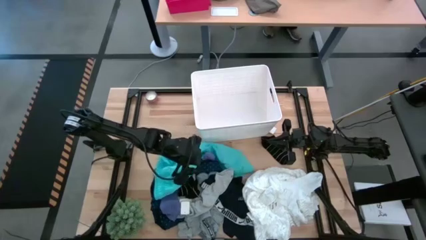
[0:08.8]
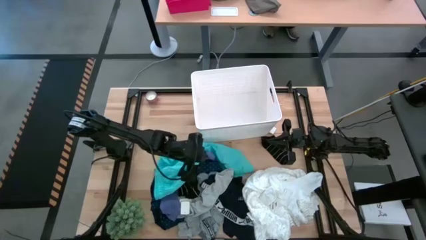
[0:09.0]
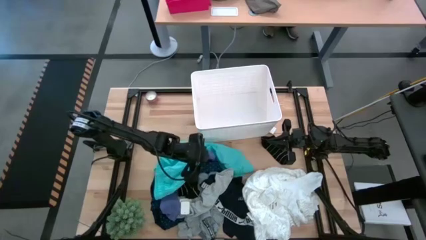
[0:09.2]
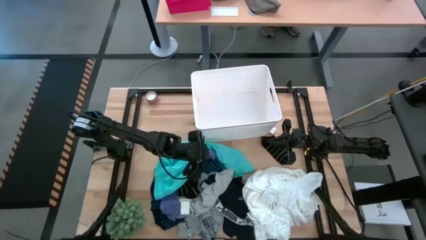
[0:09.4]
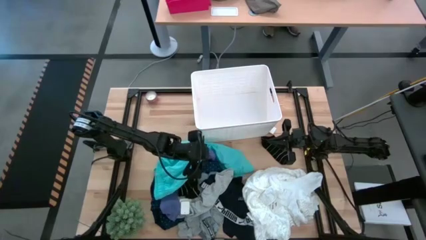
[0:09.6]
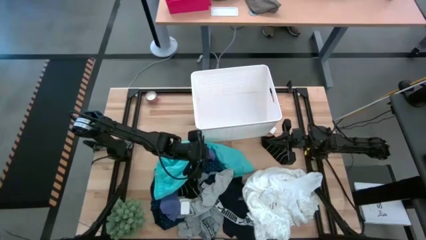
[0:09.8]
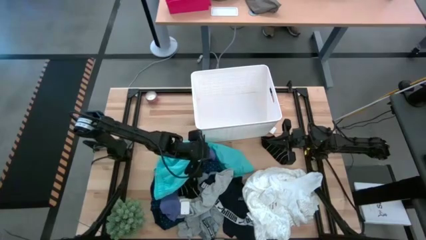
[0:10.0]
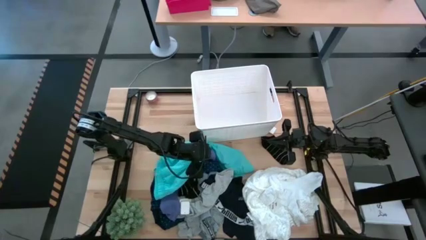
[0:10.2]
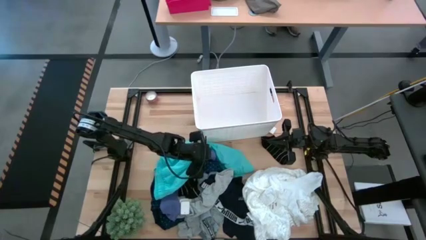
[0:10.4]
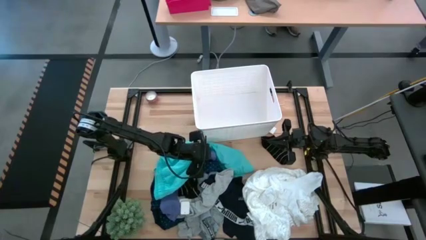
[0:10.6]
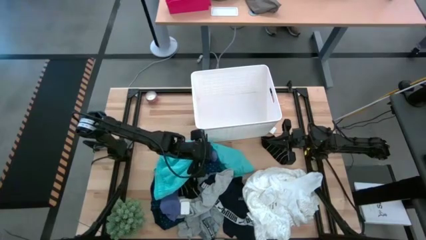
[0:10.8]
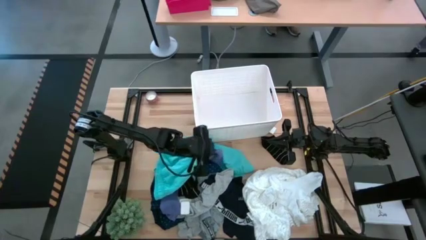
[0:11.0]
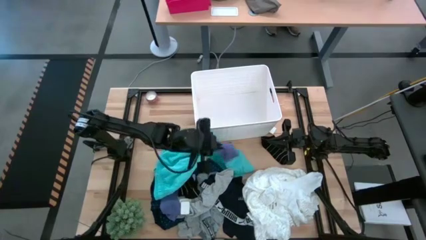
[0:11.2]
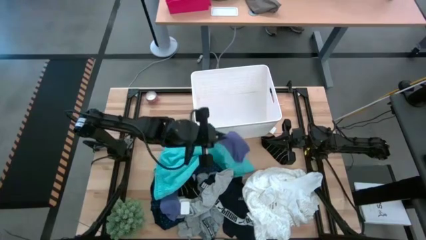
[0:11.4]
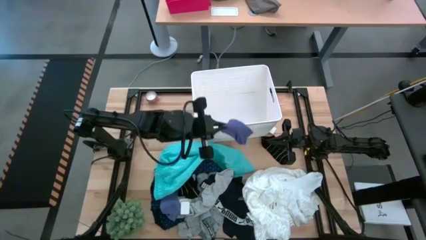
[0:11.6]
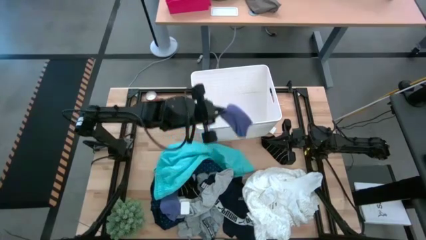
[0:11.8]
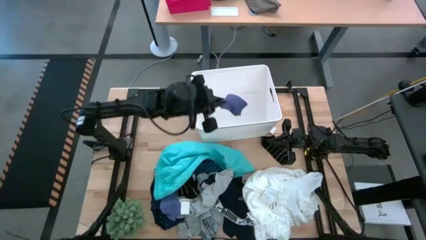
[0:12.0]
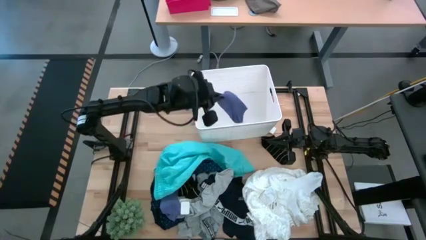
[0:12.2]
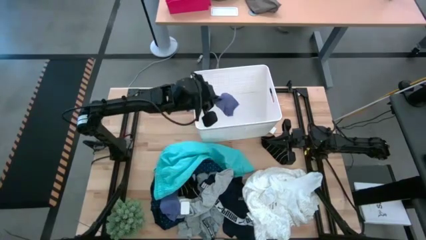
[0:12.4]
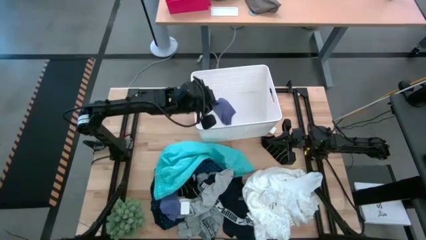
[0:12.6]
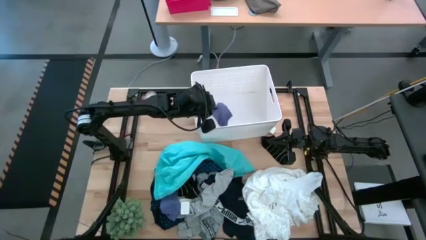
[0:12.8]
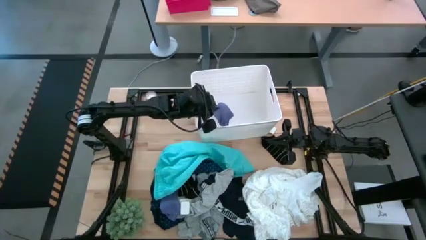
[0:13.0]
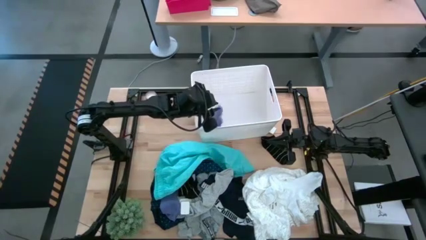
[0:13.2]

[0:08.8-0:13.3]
Task: Sort clothes
Put the purple sock in the bin

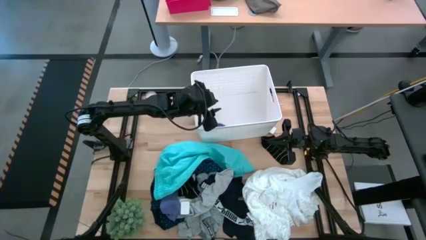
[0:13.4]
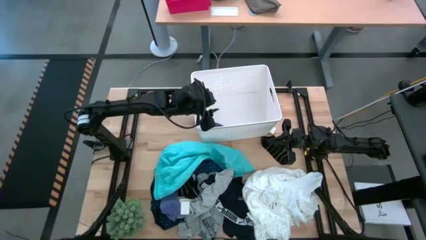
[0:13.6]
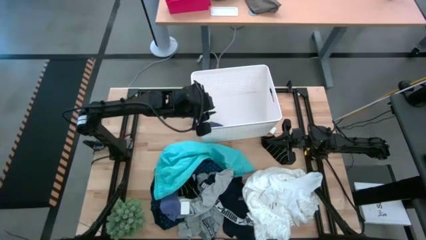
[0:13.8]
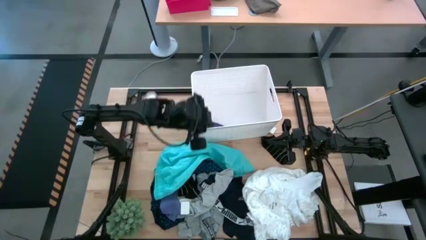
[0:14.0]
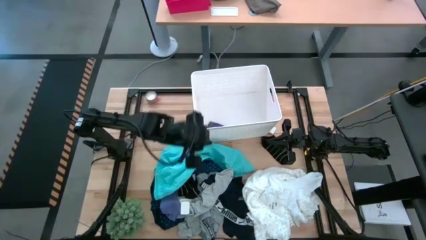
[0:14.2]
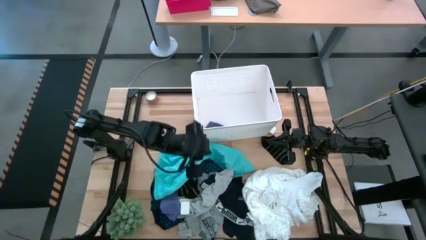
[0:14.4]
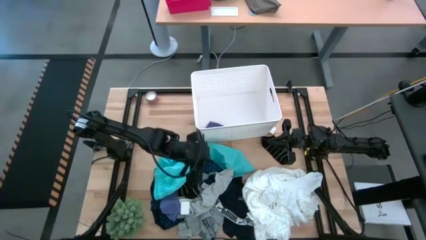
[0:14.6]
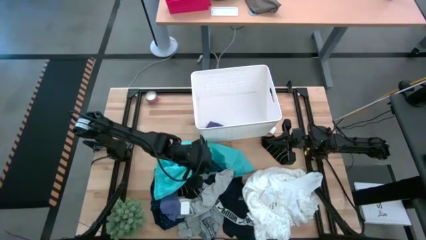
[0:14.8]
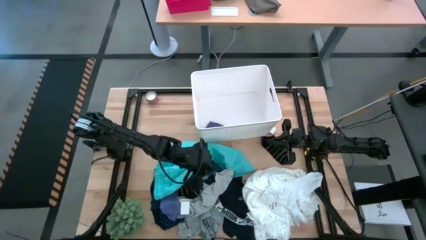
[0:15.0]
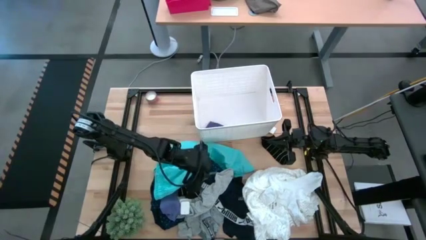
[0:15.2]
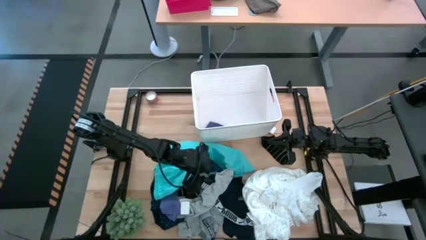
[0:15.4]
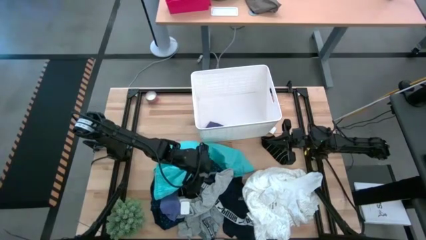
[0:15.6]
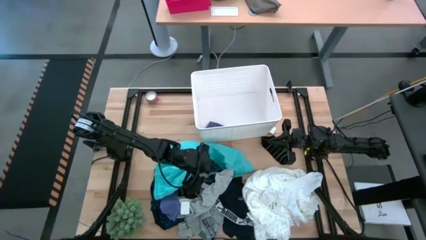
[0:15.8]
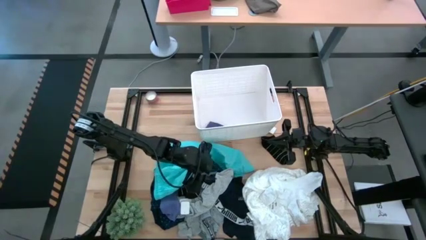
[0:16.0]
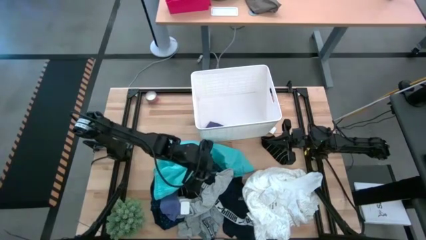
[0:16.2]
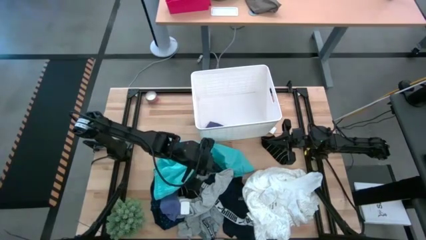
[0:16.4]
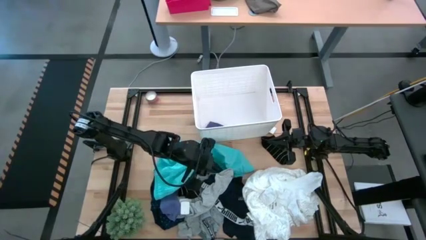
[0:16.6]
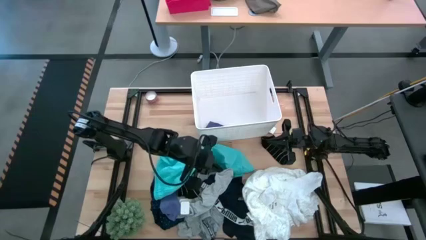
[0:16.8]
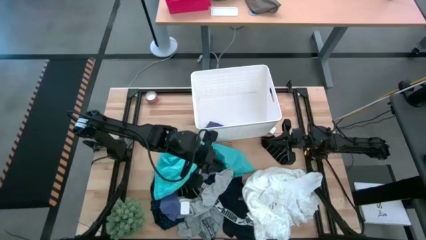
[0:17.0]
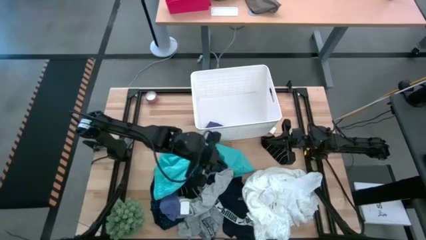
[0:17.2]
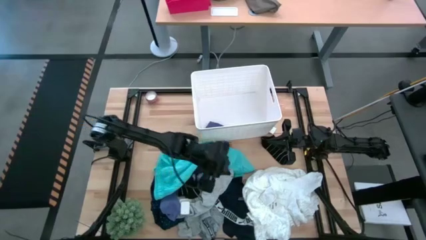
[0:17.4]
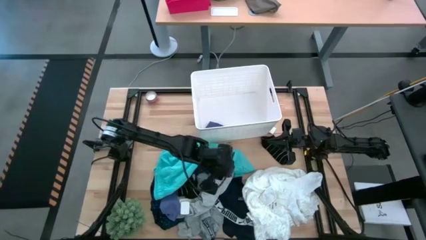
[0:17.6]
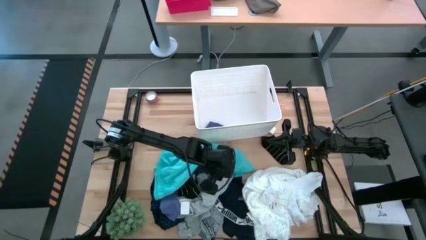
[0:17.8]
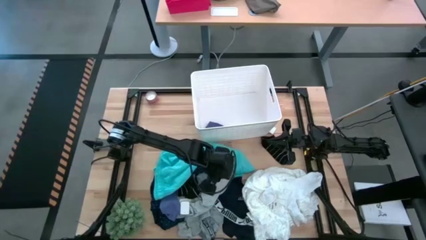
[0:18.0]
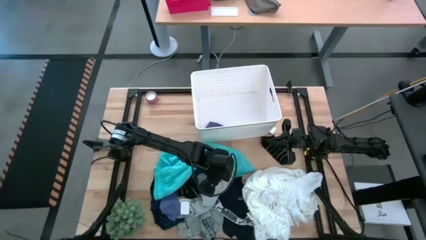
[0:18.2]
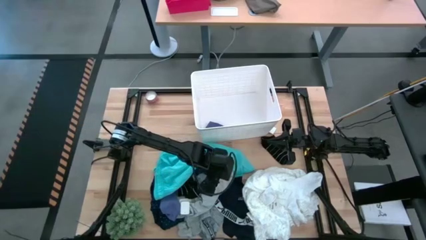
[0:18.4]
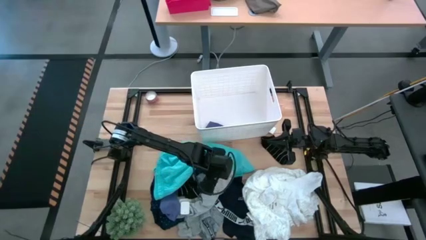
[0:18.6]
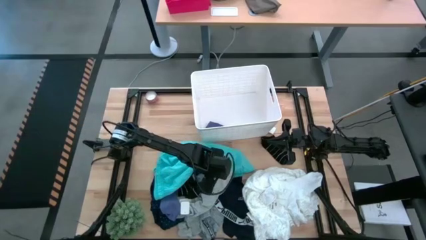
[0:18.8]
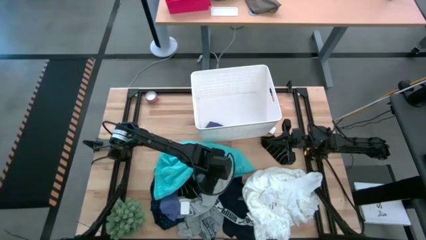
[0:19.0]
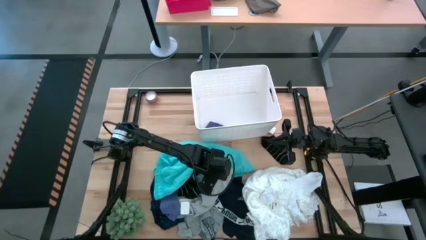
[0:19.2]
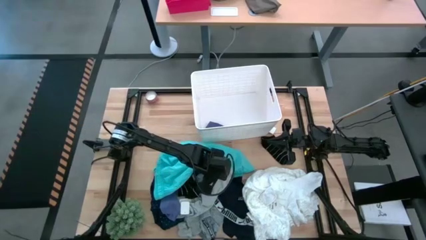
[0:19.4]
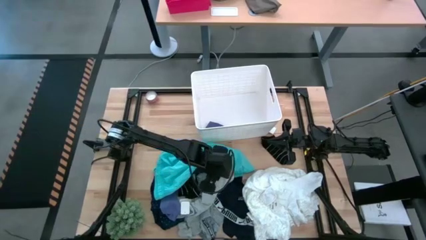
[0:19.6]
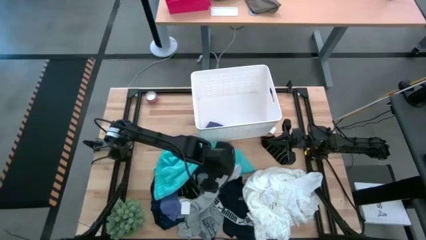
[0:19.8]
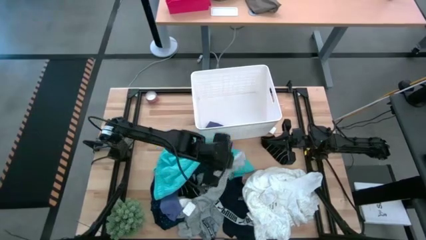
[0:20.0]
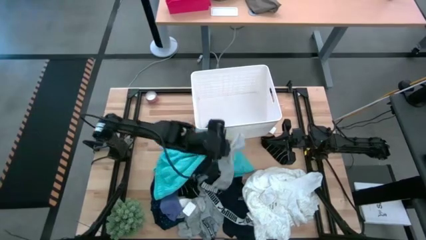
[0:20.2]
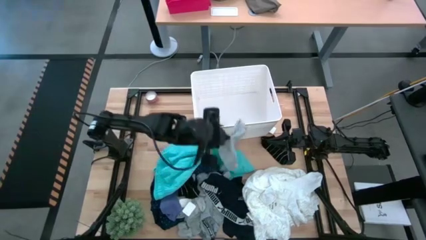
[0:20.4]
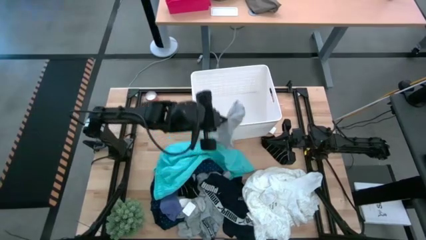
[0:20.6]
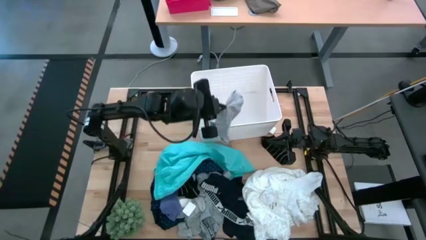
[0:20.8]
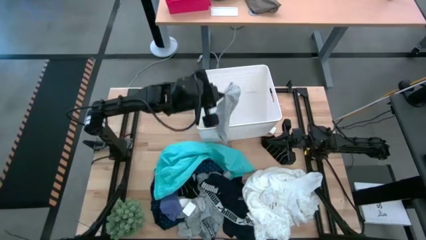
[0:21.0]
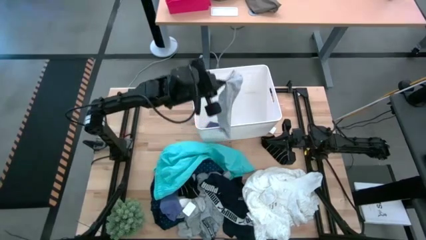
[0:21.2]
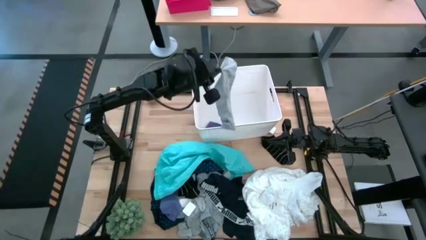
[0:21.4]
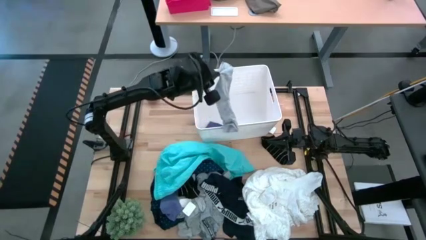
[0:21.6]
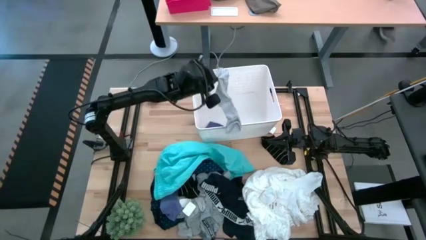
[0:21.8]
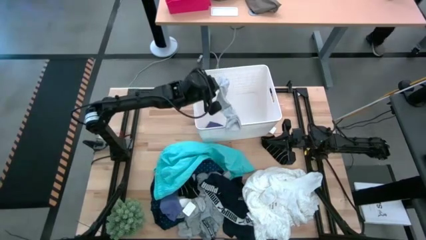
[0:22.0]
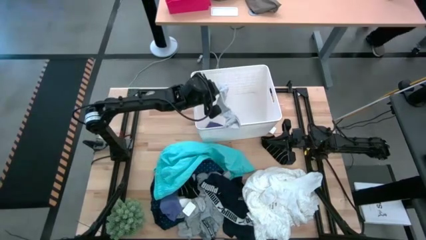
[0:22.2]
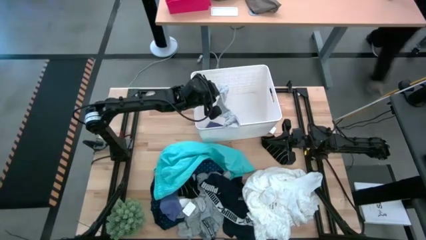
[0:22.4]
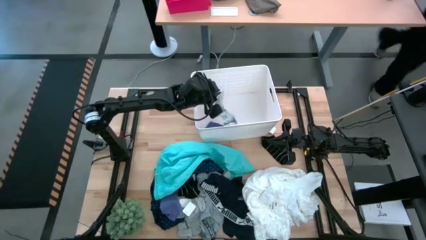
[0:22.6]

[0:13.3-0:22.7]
Put the gray sock in the bin

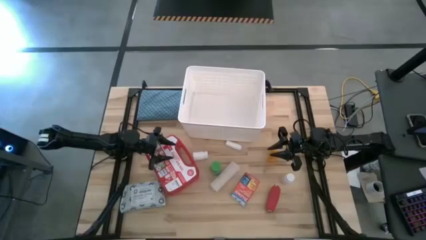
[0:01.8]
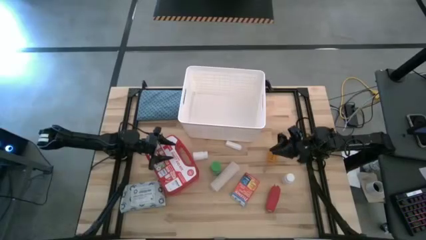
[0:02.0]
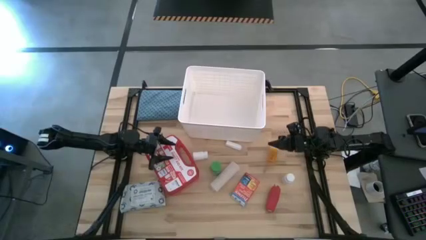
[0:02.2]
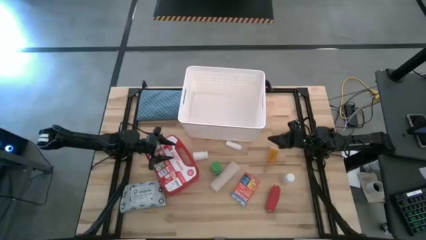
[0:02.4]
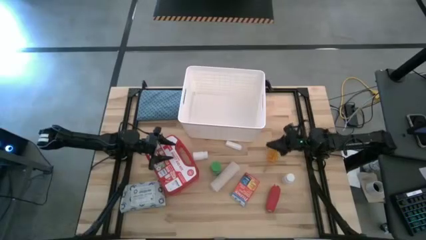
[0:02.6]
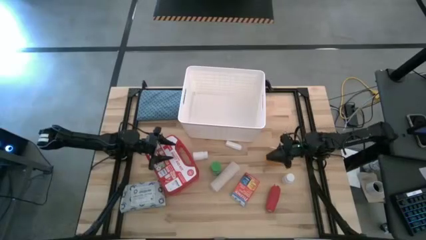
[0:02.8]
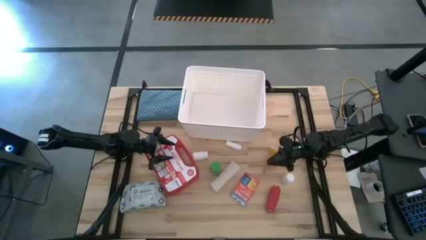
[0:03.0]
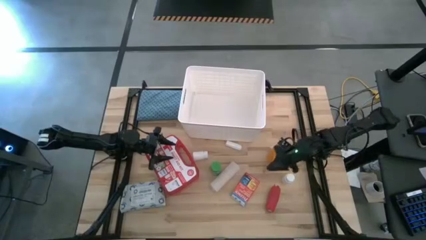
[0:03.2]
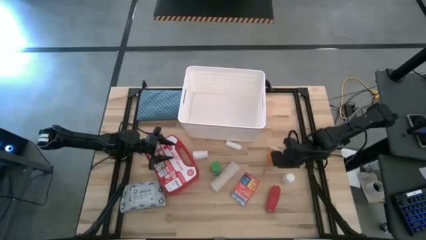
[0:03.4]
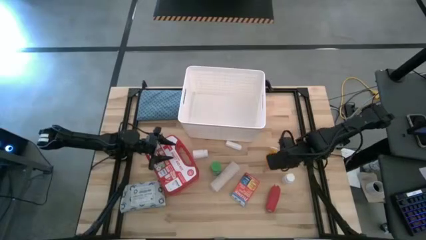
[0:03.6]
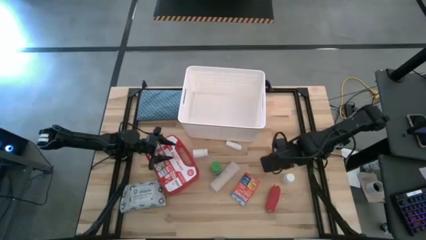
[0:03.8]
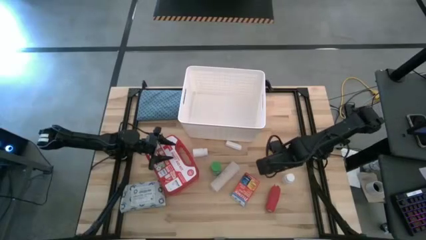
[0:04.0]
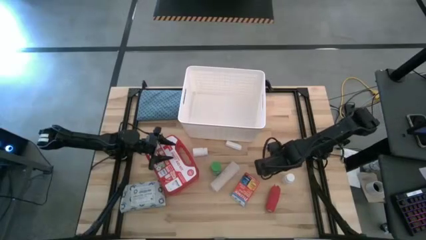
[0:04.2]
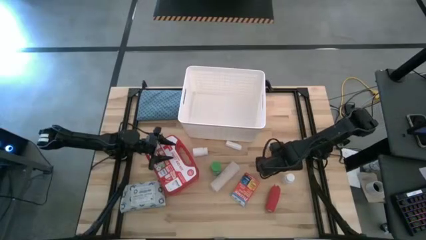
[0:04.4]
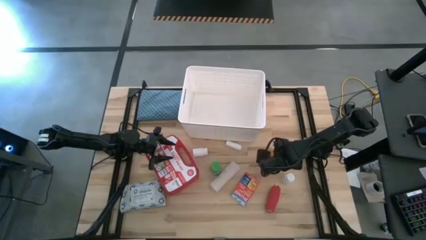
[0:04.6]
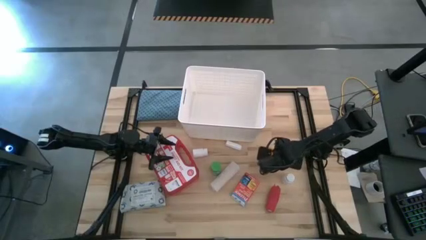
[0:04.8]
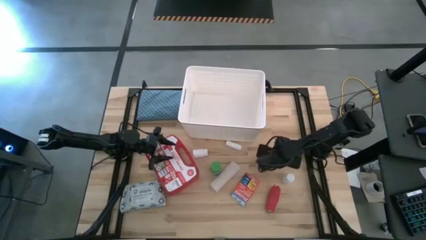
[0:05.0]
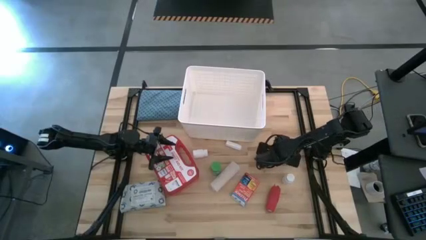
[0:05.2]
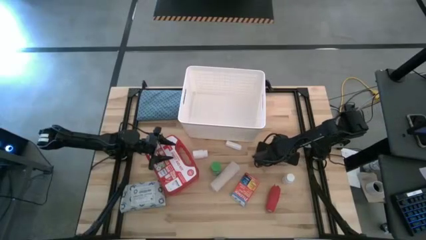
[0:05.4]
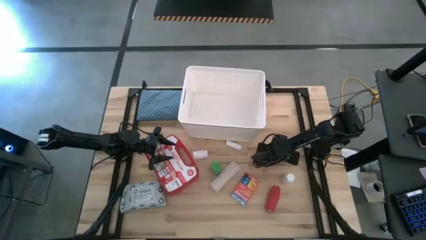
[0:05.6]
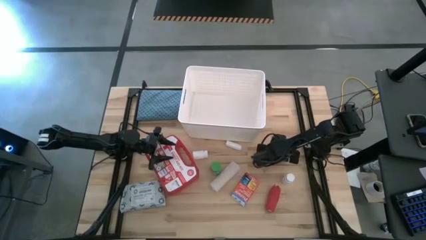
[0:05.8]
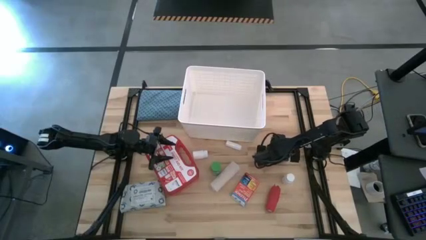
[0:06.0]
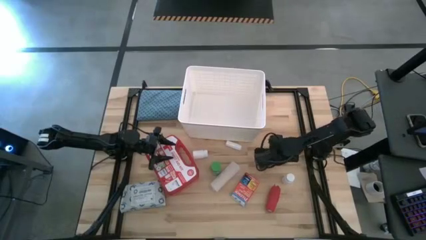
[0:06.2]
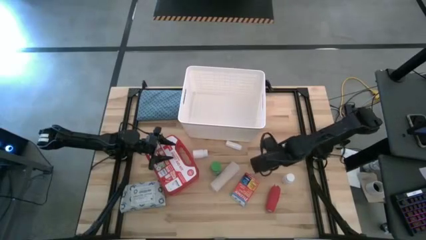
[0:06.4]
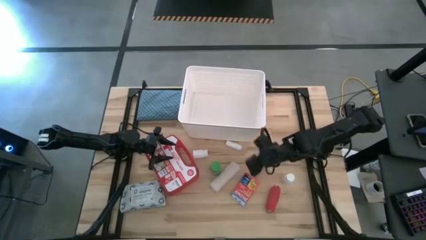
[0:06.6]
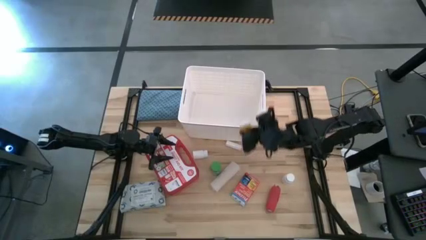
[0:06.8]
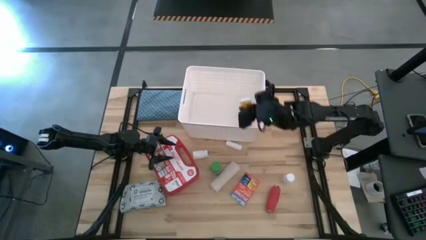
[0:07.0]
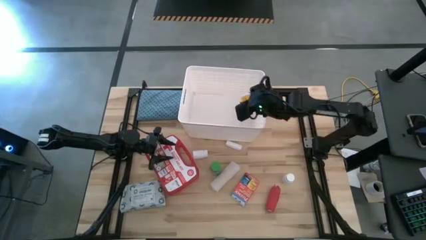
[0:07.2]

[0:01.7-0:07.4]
Task: Pick & place medical supplies in basket/bin
Put the orange pill bottle in the white bin
